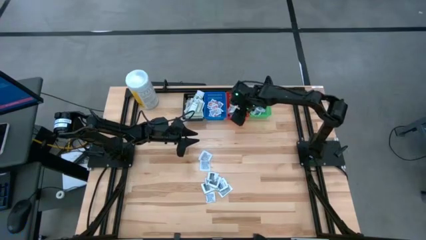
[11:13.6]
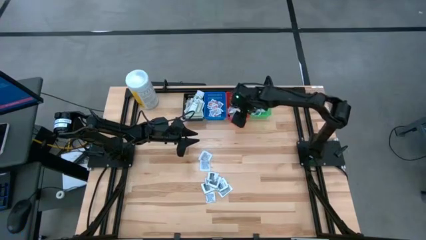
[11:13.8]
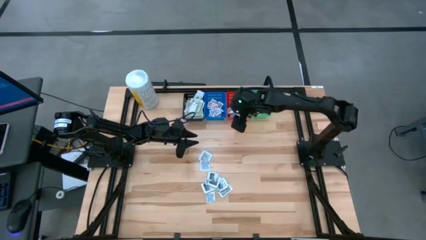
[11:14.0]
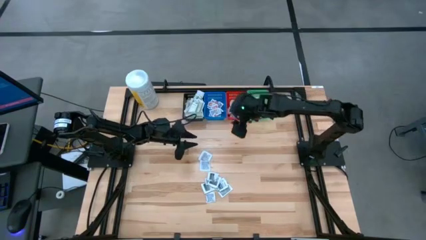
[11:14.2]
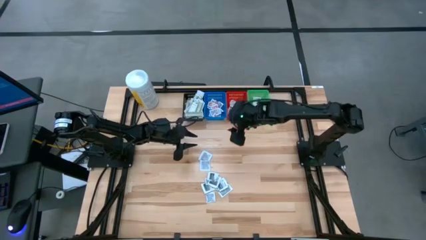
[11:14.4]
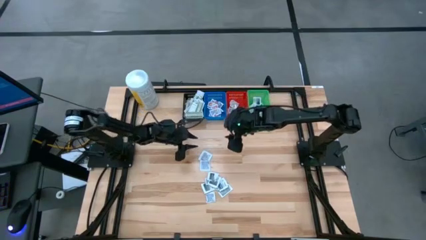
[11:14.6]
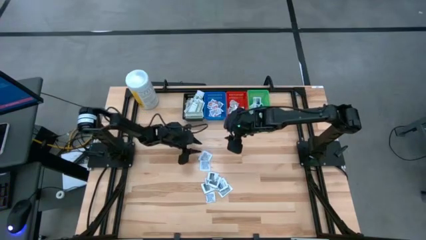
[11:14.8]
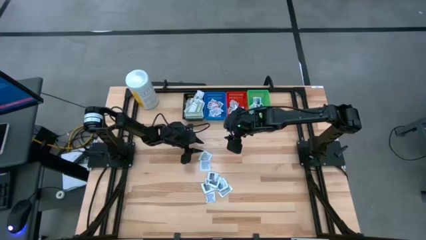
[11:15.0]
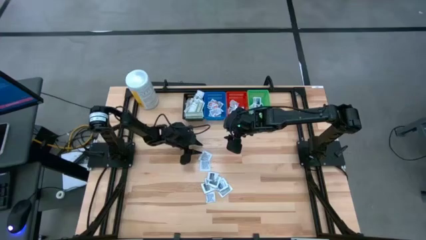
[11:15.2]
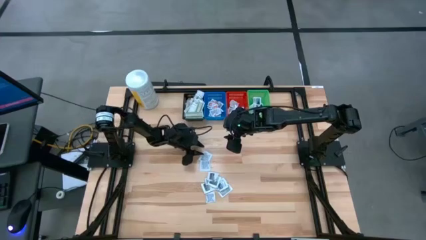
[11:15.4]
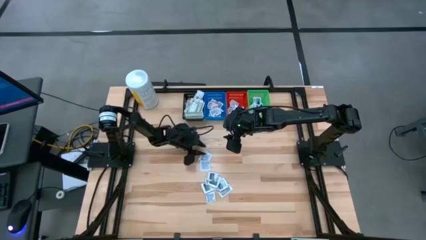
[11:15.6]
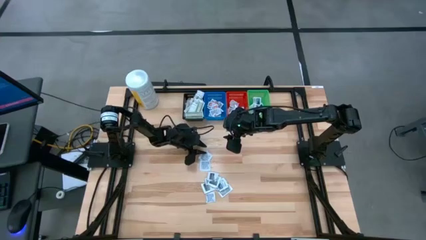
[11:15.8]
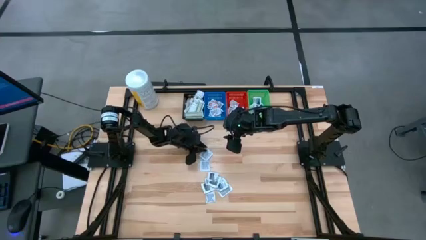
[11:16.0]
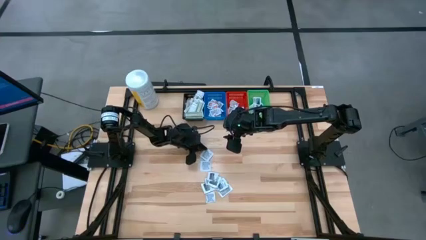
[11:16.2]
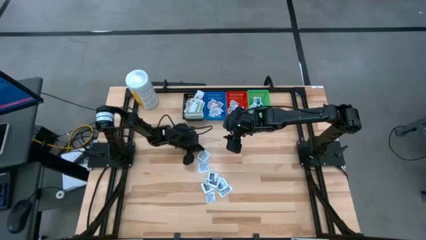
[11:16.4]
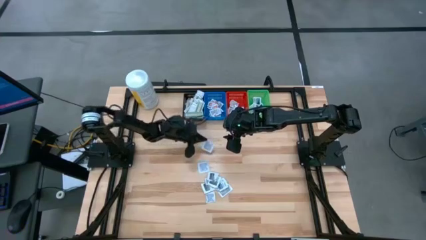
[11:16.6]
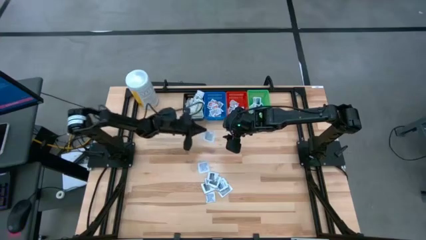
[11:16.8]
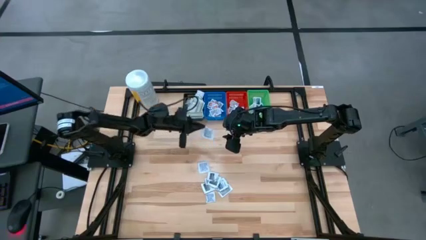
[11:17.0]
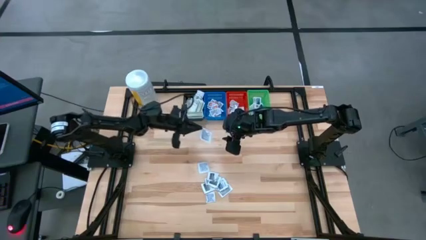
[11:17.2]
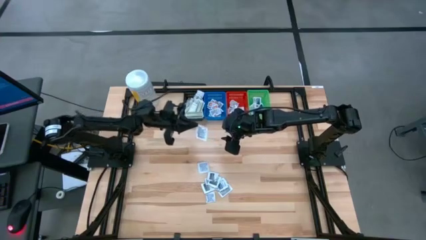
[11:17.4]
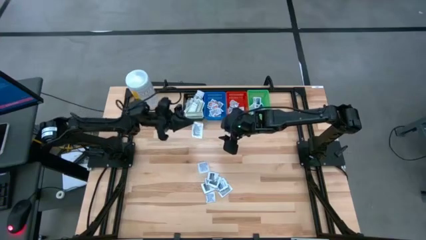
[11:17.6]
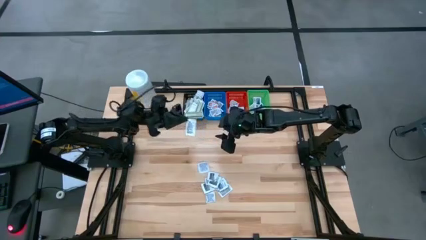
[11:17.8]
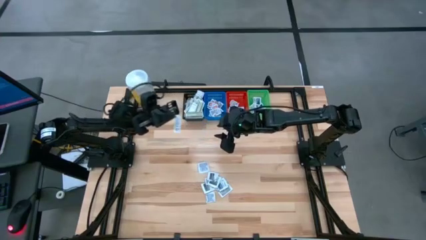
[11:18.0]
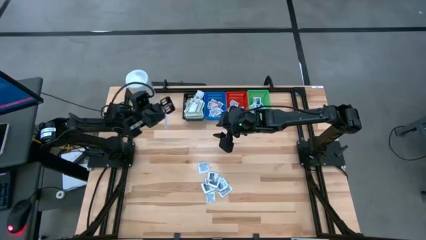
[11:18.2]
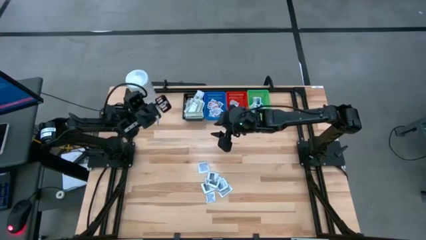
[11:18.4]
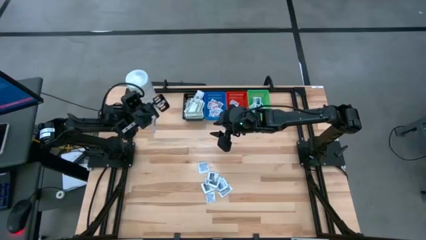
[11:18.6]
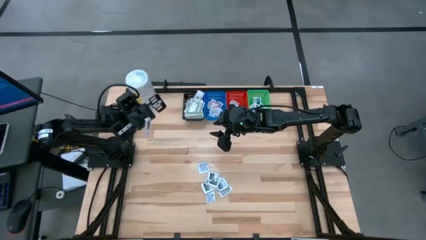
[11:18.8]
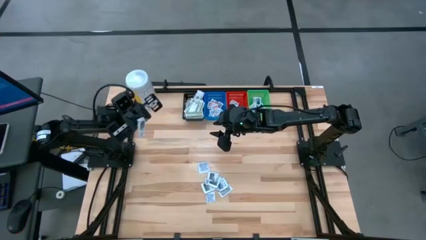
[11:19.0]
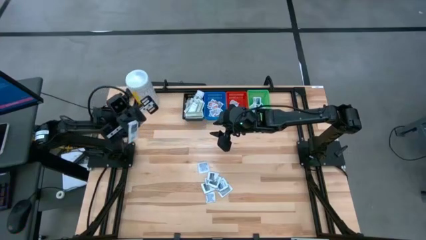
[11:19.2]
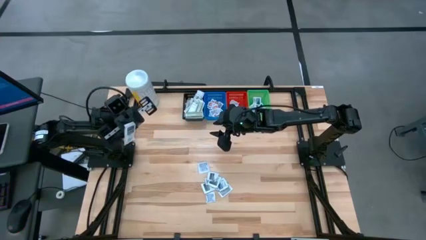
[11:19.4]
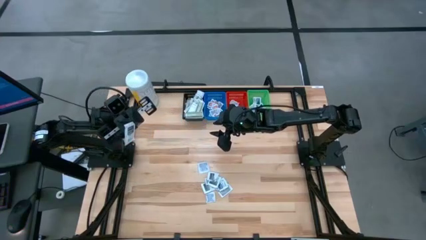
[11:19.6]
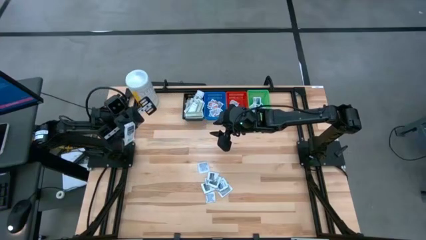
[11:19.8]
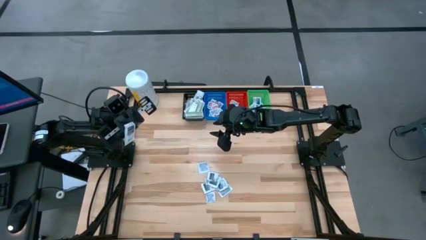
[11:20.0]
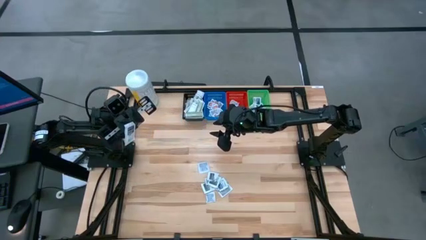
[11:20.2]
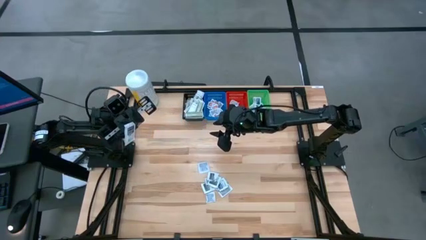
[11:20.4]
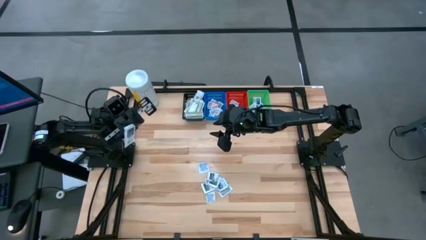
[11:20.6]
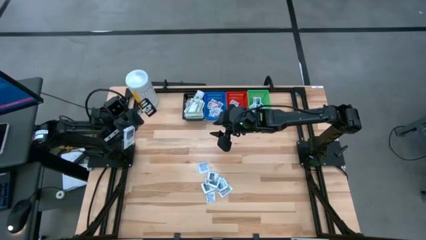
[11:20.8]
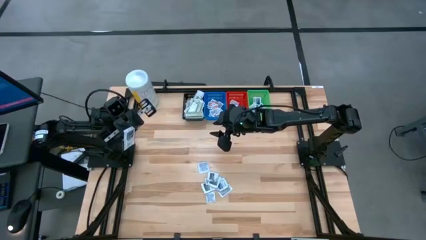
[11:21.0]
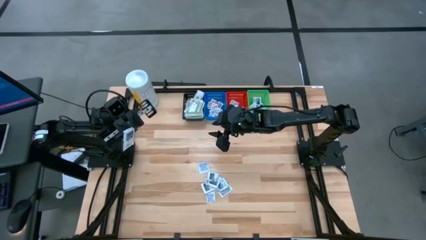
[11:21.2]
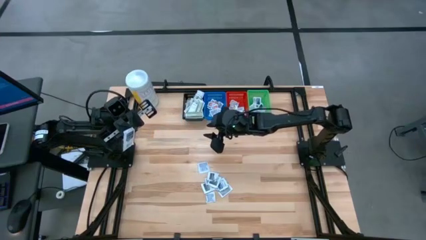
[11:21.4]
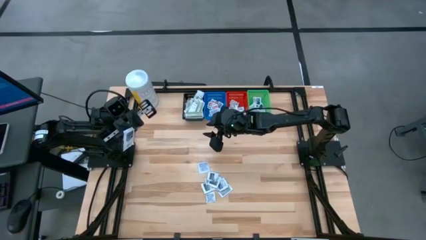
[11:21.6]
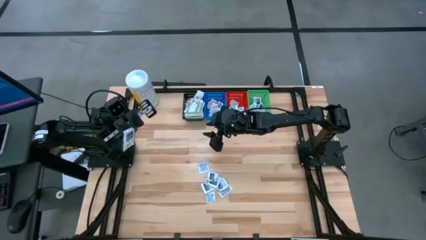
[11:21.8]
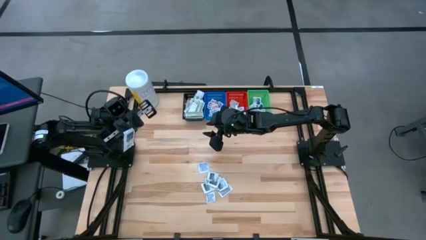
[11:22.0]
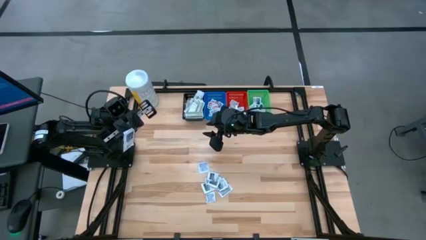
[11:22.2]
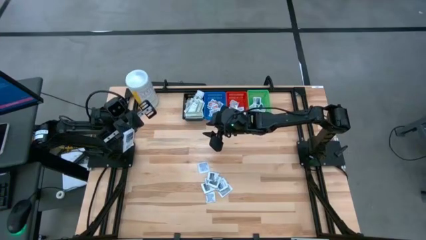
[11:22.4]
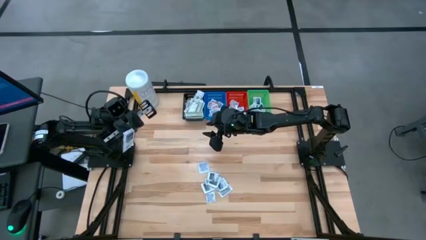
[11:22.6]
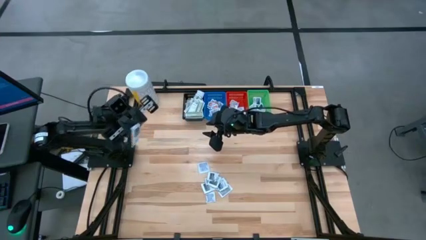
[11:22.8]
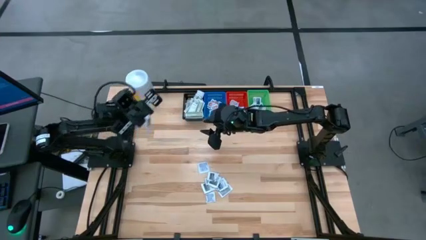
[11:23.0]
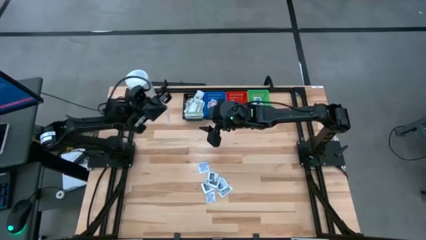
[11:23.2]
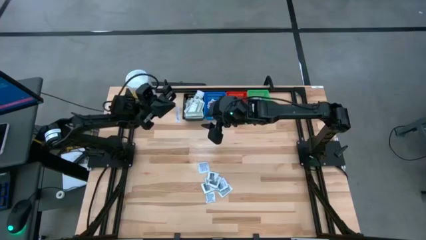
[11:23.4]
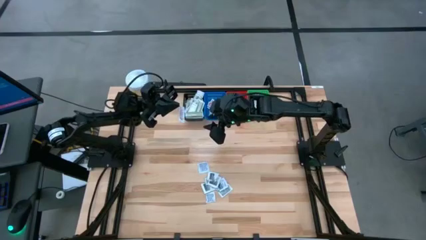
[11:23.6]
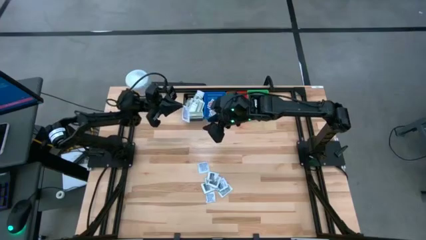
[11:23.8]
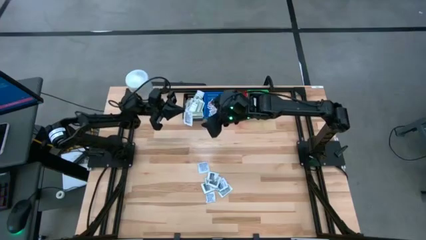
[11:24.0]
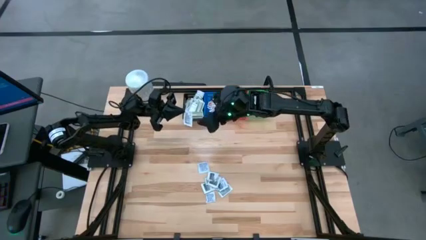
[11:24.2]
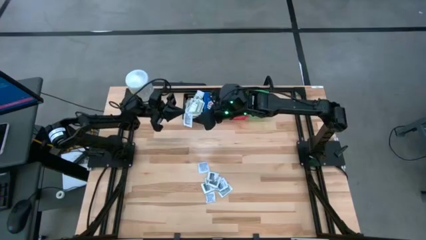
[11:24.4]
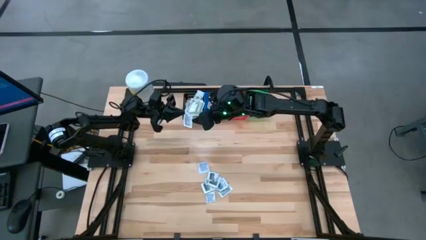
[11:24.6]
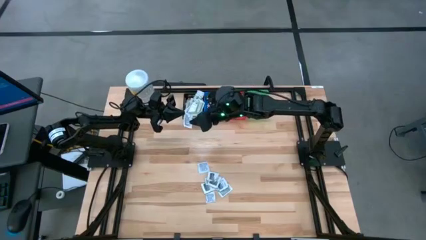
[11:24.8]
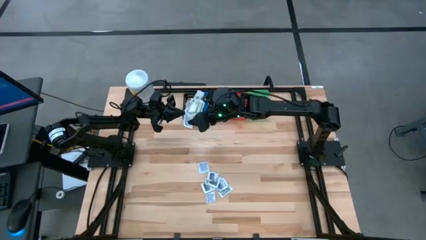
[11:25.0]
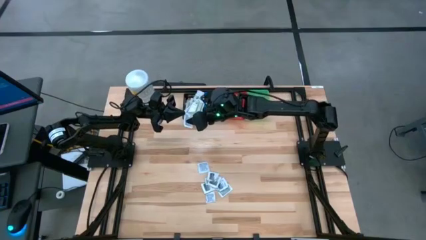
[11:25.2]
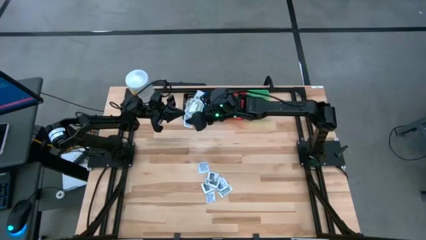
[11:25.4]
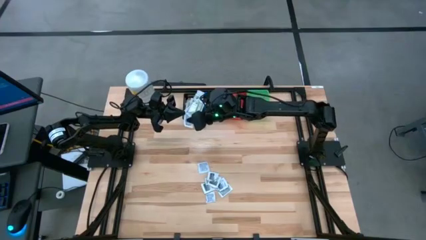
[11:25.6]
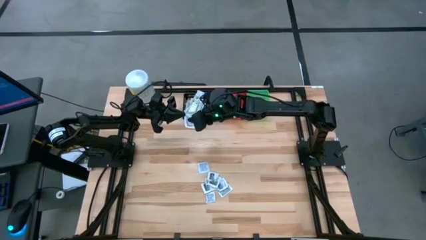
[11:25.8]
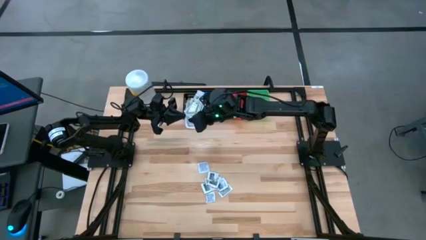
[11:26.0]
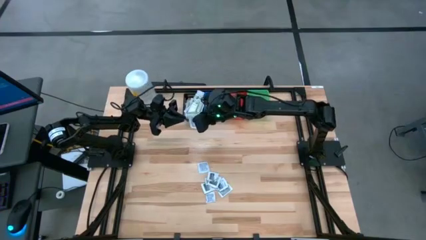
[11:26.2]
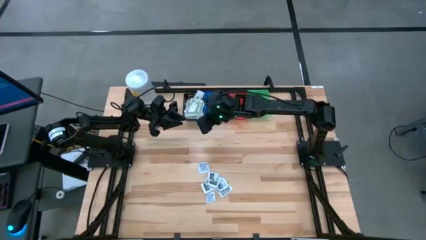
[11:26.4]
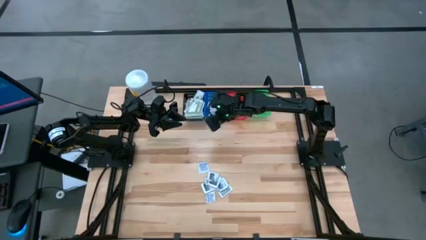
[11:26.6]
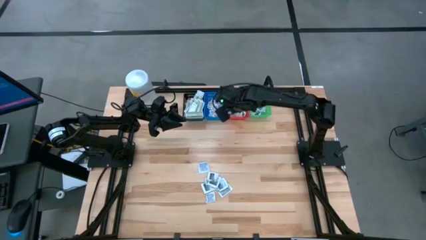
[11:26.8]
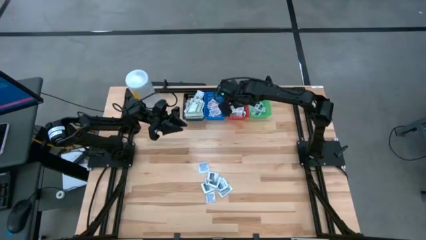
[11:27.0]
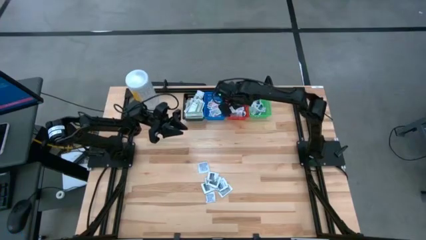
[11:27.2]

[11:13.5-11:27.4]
Task: Pick & Place First Aid Supplies
Put the gray towelette pack in the red bin
